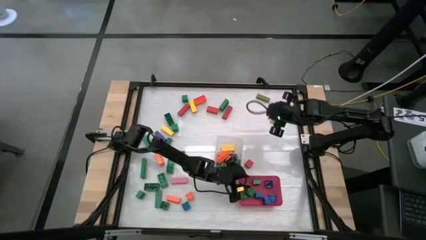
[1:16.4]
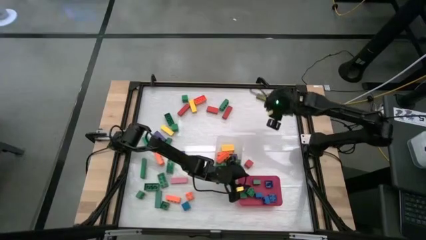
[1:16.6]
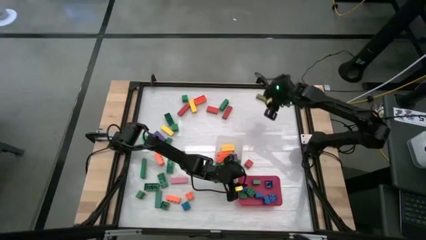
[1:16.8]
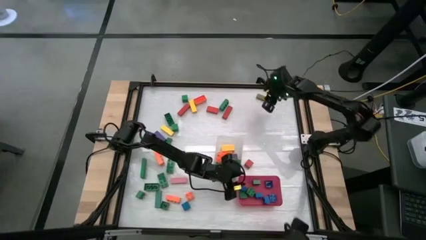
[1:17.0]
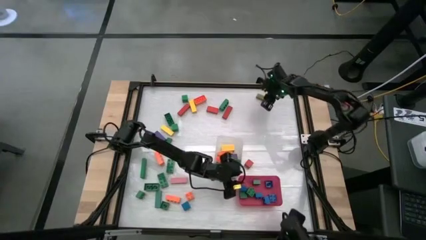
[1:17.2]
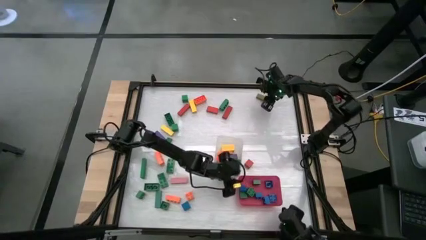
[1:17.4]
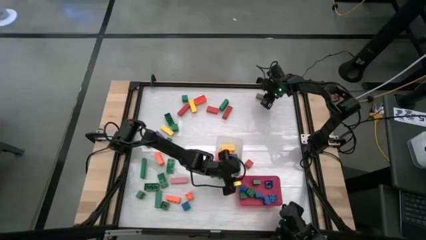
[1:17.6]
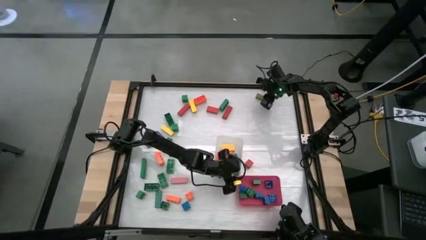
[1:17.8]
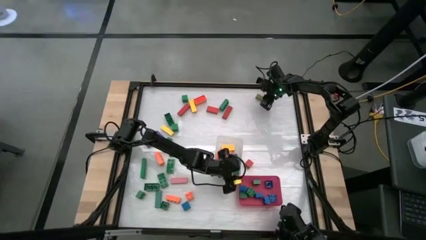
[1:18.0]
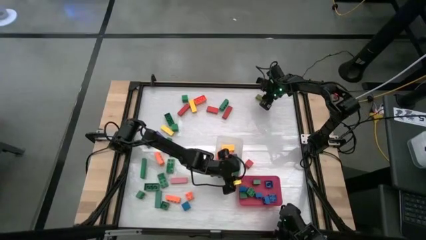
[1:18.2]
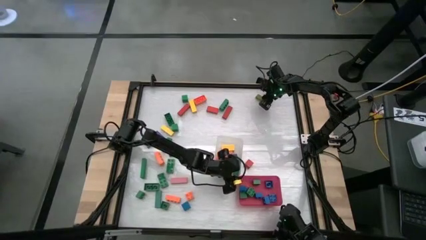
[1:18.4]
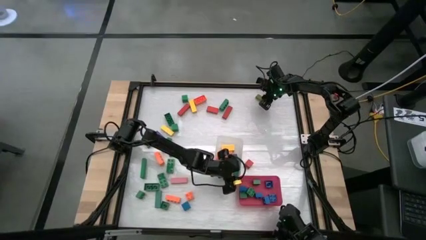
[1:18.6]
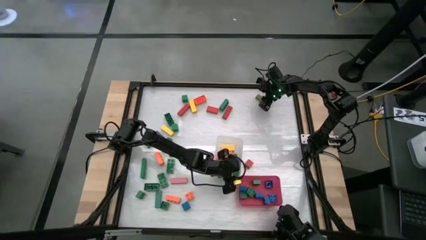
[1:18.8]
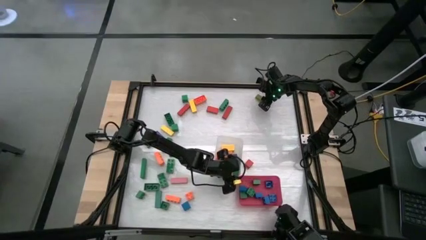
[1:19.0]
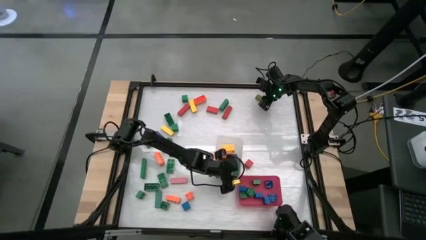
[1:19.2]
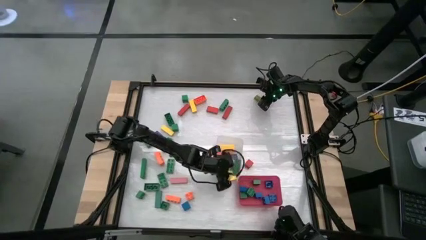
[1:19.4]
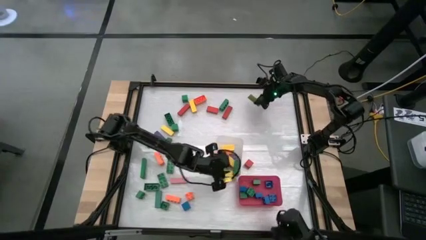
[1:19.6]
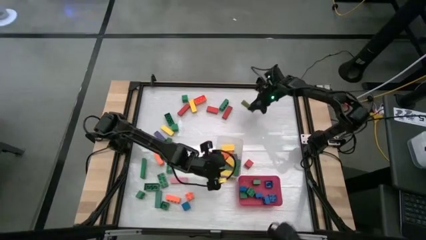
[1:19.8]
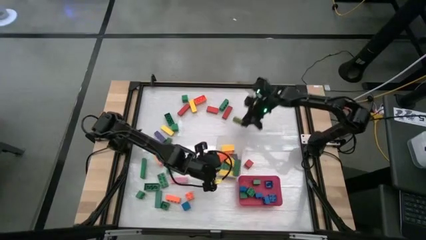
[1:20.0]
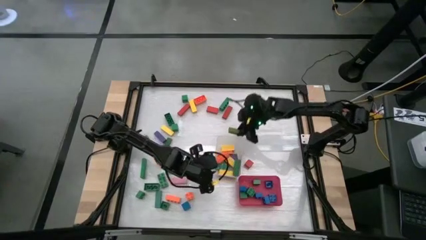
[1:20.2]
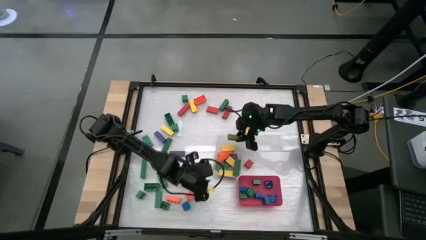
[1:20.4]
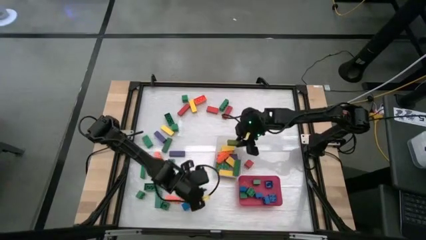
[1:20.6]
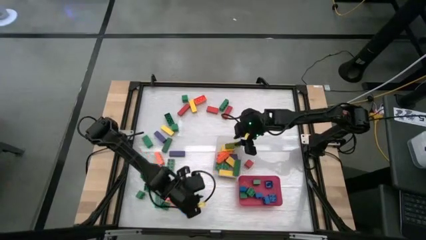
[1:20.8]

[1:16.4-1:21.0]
Task: Sort blocks by size
Put the light green rectangular block into the transparent bin

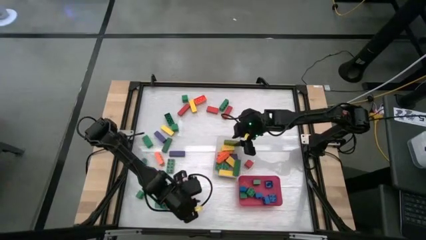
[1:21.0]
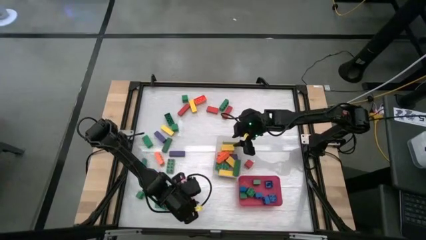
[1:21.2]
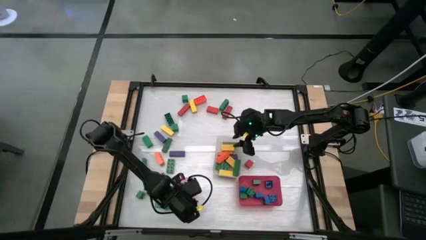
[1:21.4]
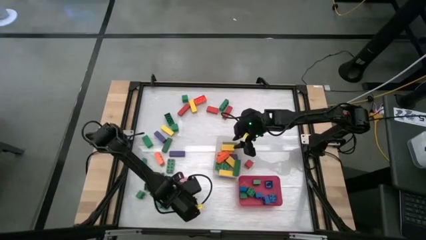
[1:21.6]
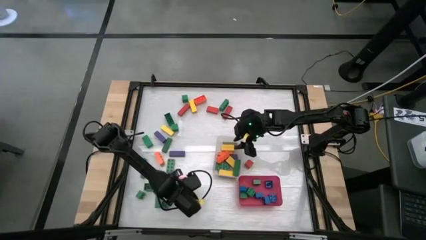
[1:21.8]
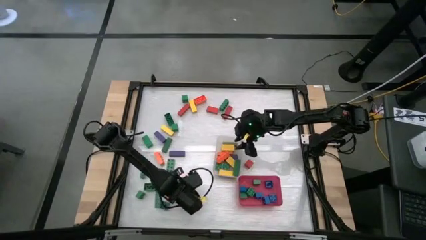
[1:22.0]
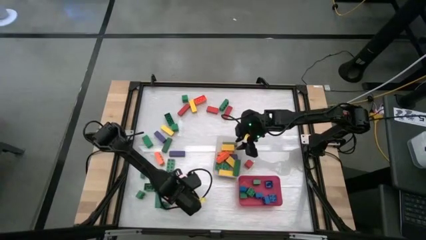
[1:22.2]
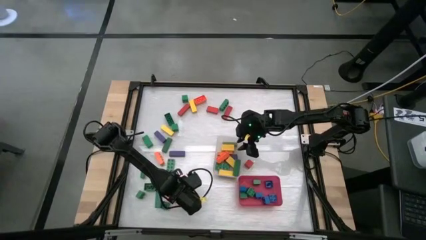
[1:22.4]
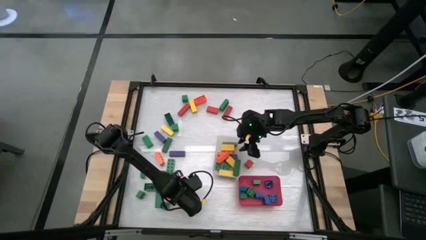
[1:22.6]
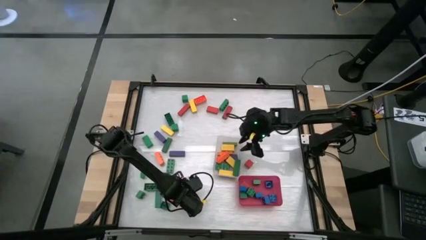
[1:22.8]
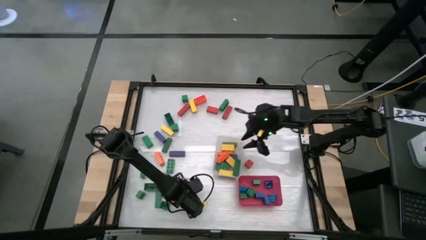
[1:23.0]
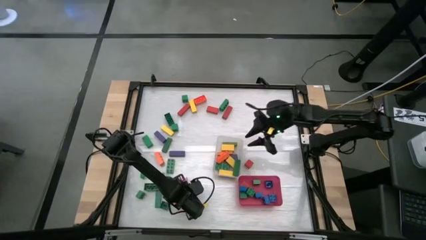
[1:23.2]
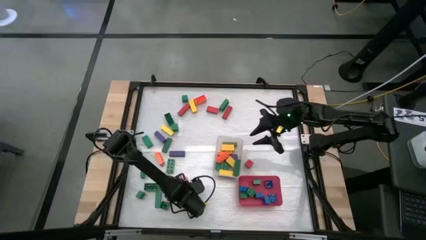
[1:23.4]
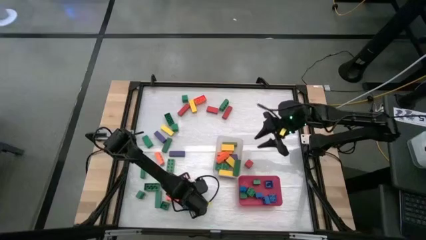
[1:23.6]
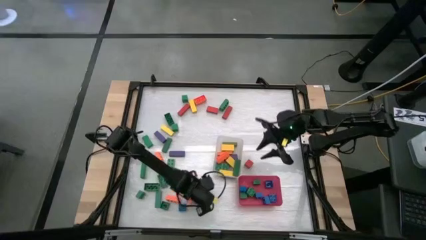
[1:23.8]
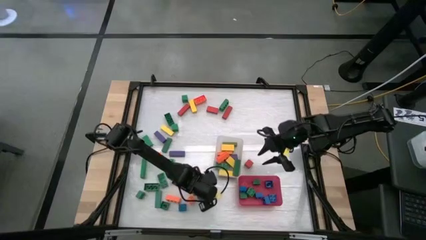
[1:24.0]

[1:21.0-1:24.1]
Put the orange square game piece into the red bin

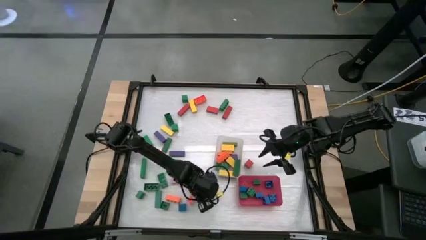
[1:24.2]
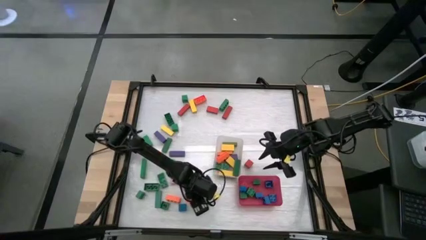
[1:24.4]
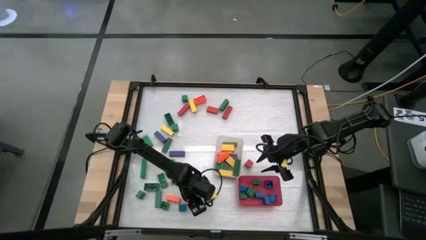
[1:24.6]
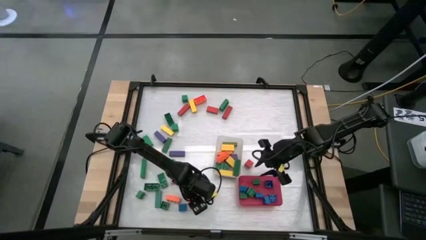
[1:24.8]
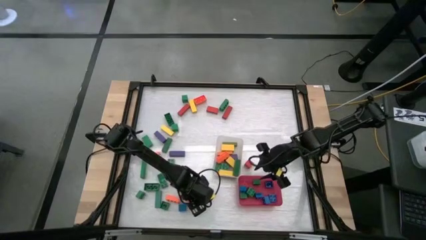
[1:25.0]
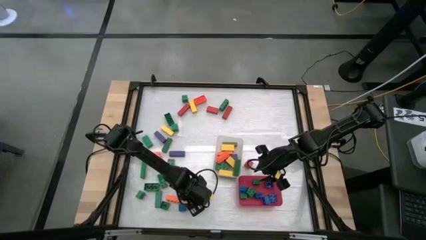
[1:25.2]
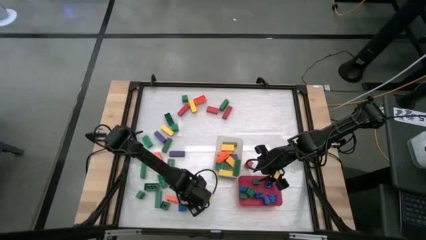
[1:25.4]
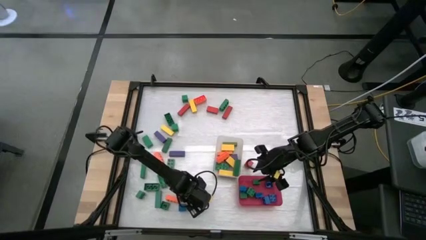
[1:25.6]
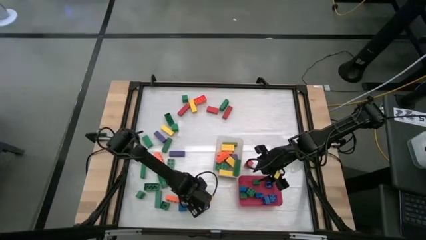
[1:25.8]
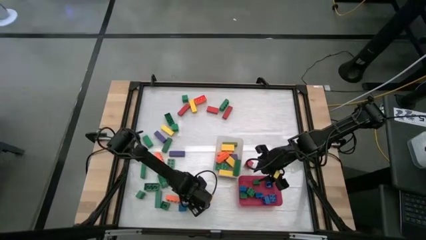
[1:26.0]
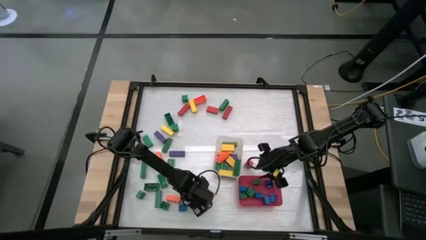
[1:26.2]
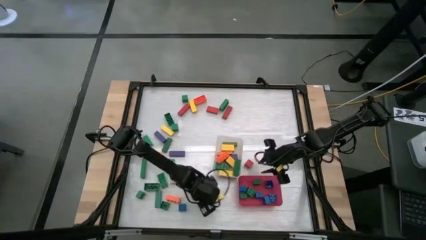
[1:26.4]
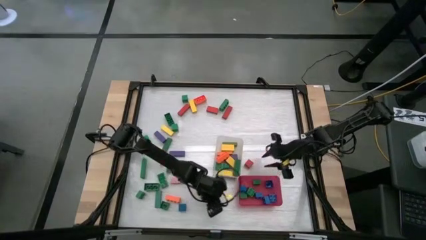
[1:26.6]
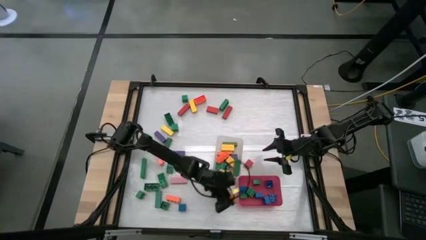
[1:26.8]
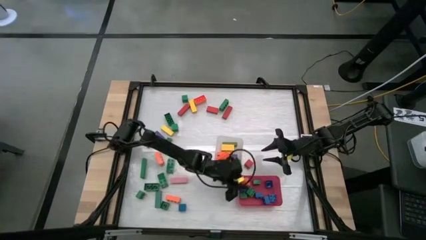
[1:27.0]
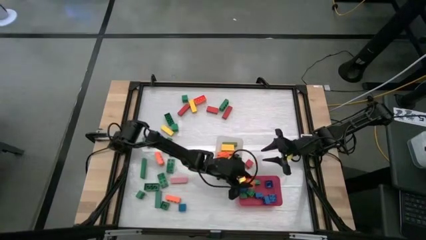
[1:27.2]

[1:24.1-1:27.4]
Put the orange square game piece into the red bin

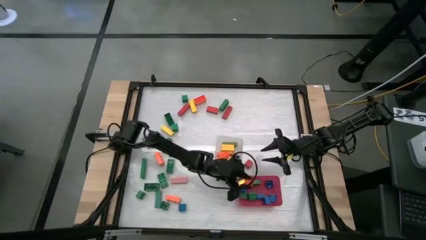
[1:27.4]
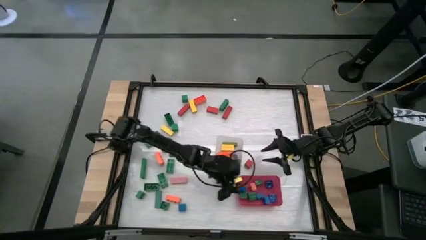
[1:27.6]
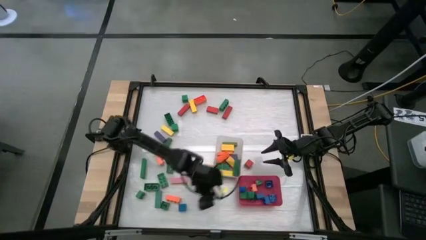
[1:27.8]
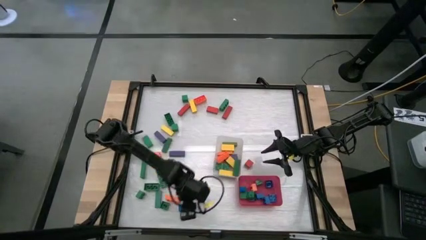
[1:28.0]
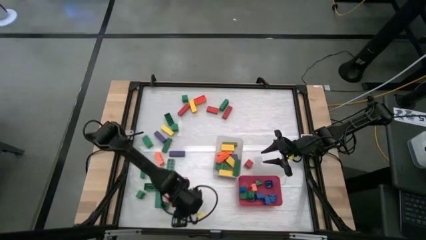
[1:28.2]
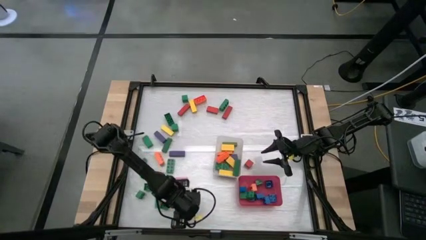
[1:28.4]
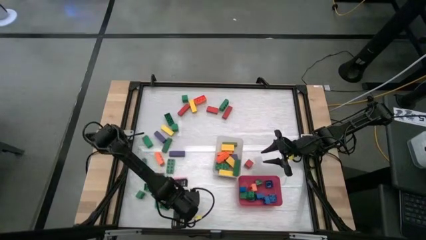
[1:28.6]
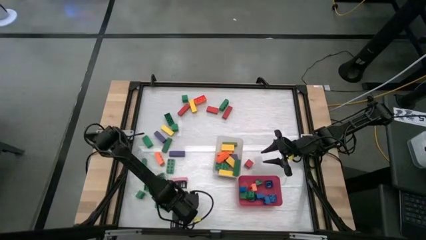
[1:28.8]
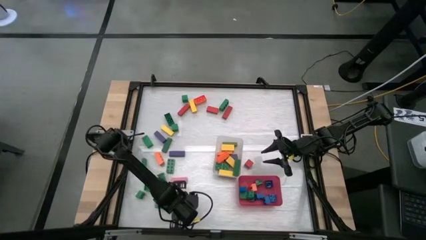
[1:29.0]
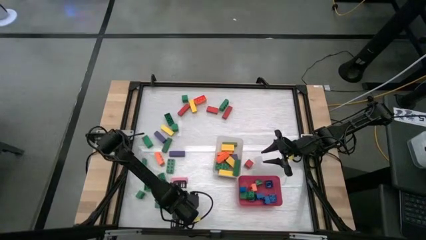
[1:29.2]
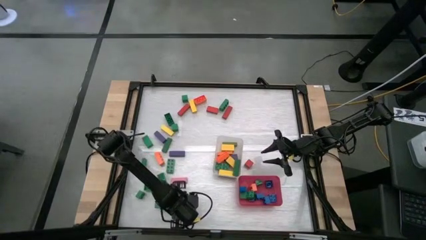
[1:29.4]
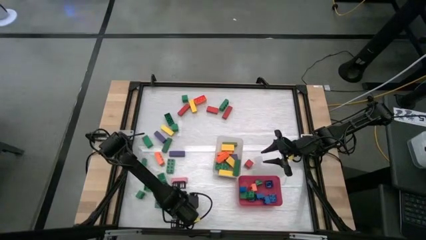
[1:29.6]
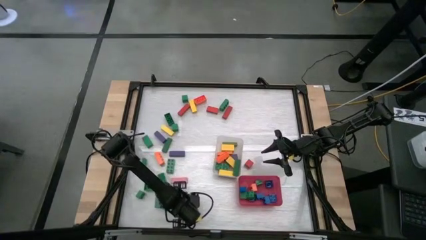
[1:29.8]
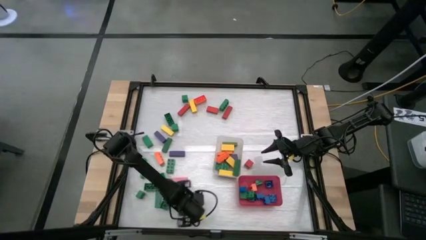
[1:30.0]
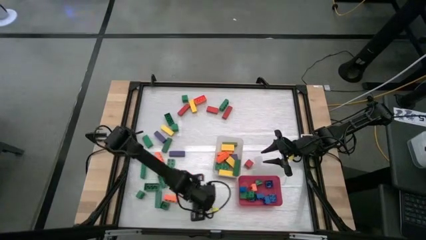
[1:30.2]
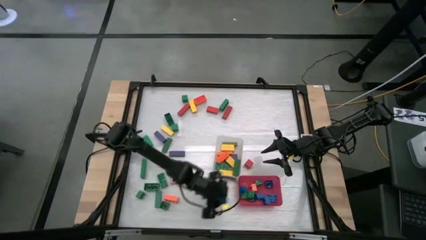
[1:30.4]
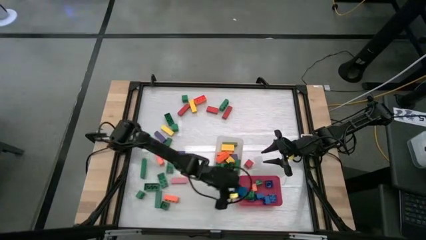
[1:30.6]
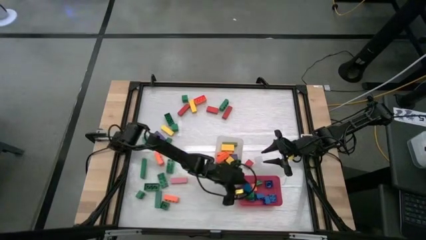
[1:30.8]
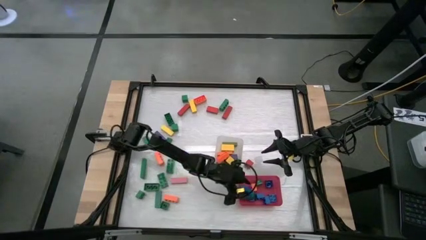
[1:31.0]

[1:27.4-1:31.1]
Put the blue square block into the red bin

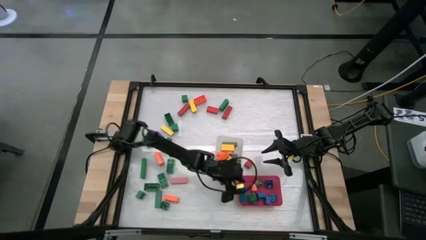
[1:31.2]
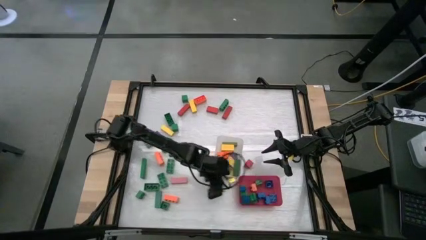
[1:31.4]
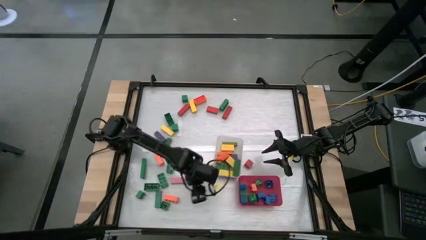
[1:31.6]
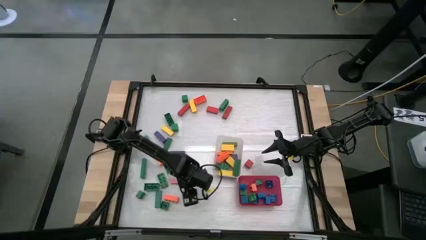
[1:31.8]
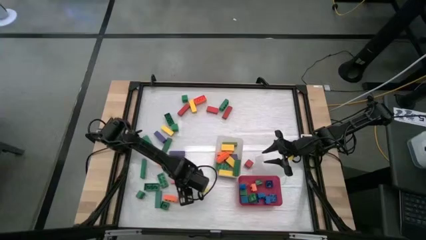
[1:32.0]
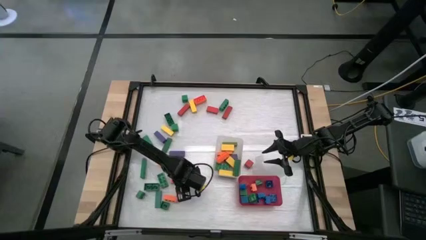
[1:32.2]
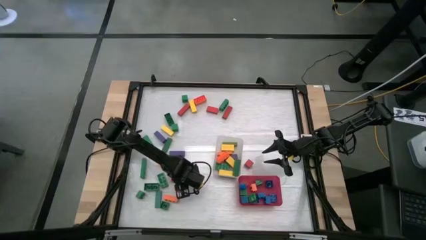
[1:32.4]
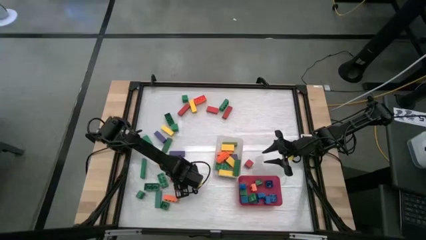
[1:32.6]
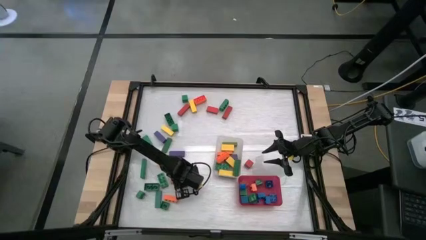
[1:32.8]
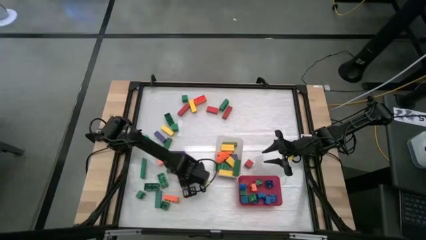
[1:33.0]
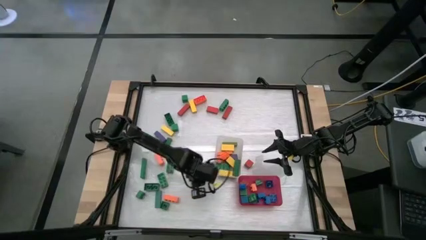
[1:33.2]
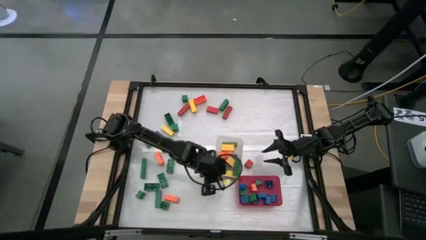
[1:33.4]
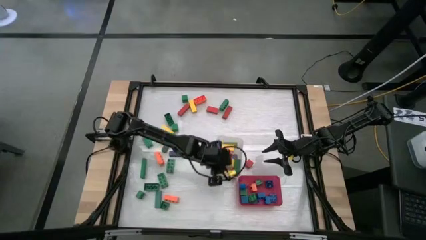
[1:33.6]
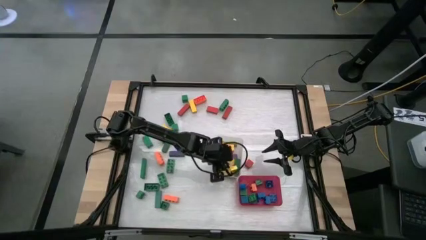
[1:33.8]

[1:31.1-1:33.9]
Put the pink rectangular block into the transparent bin
